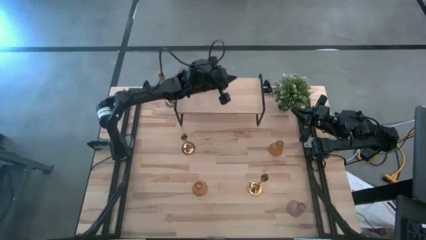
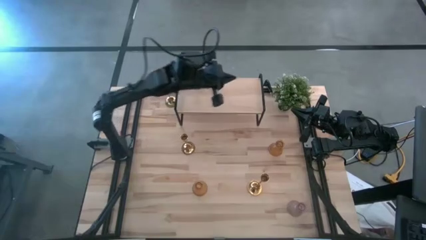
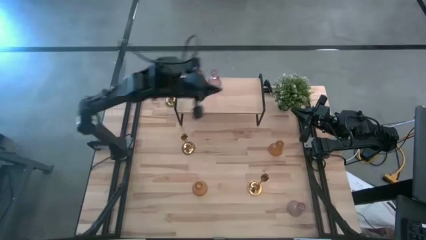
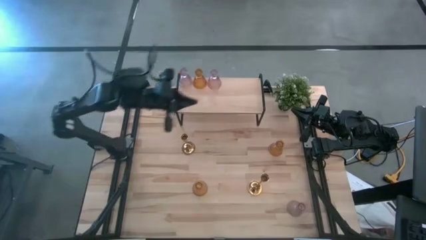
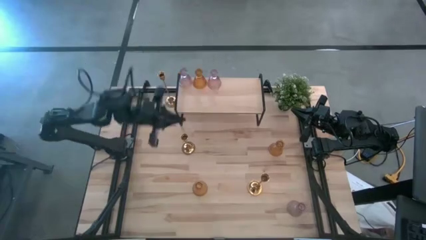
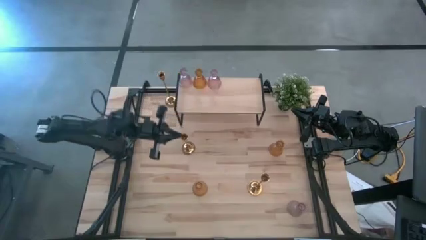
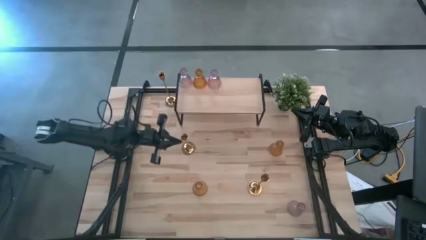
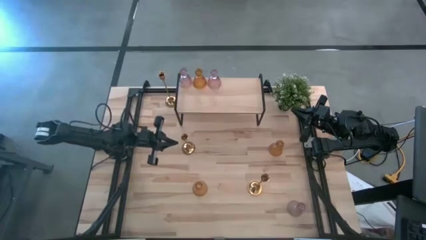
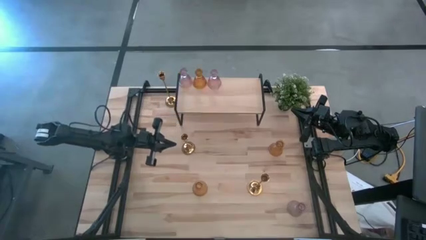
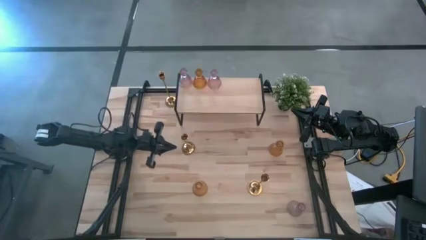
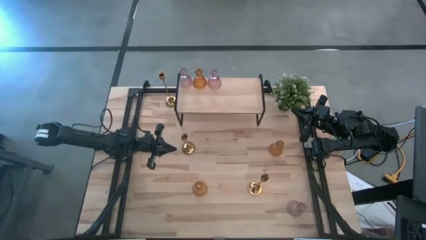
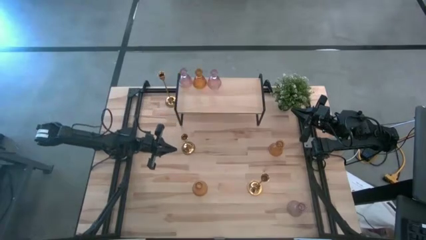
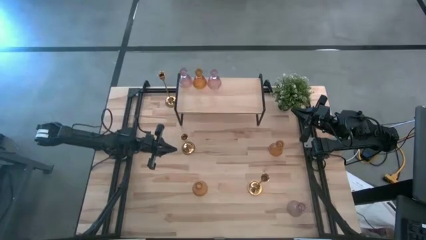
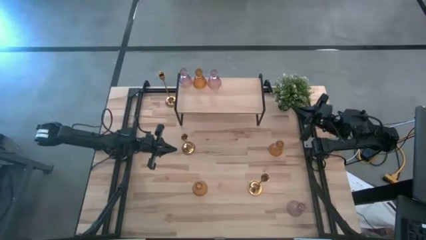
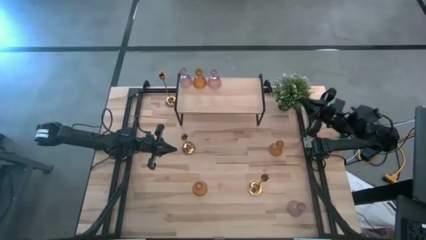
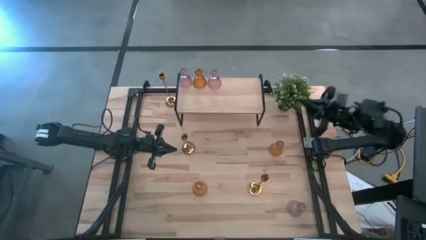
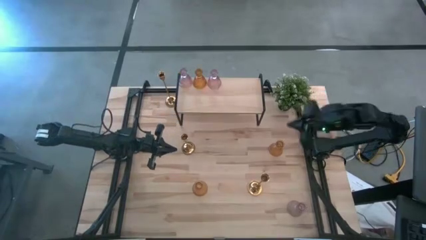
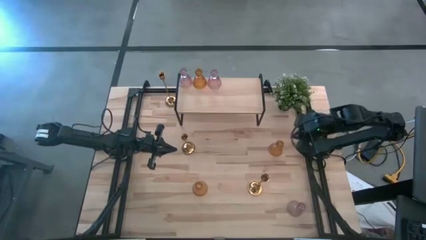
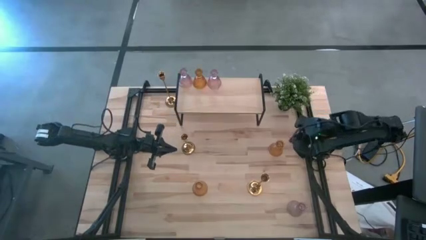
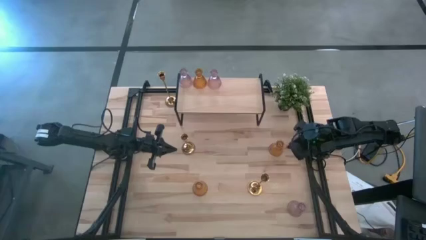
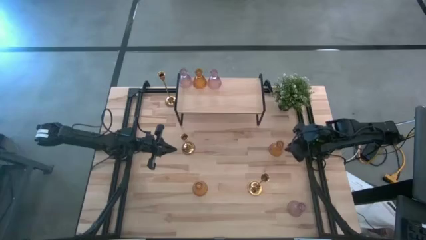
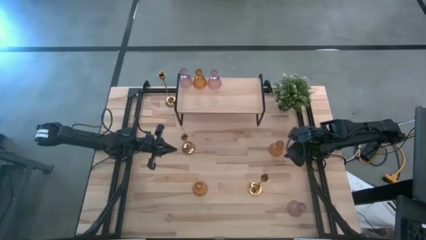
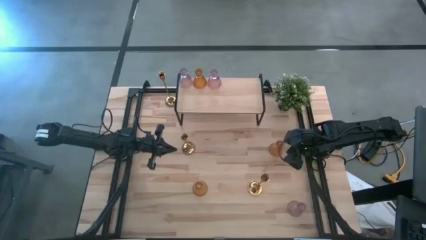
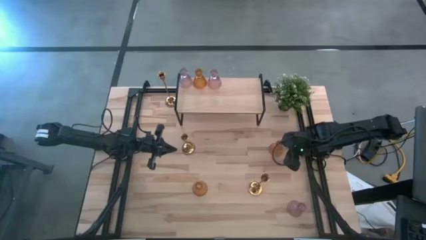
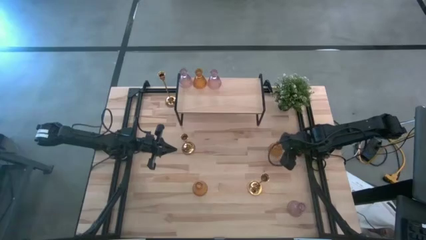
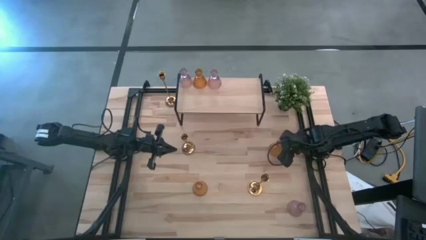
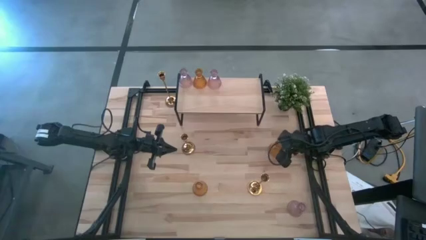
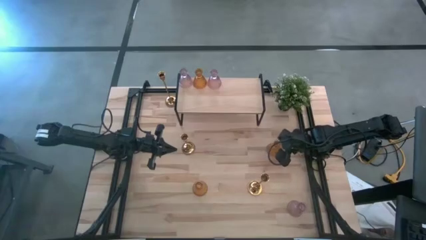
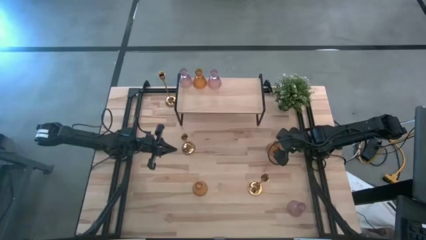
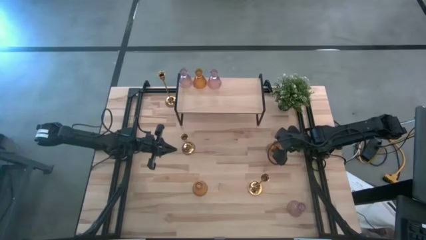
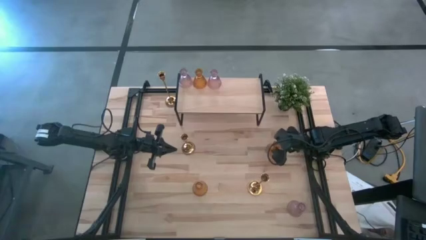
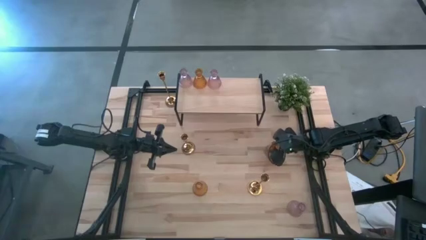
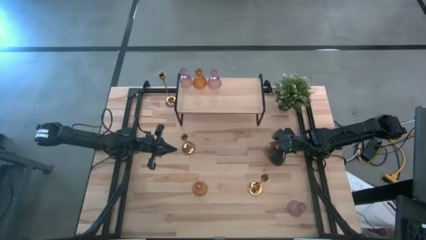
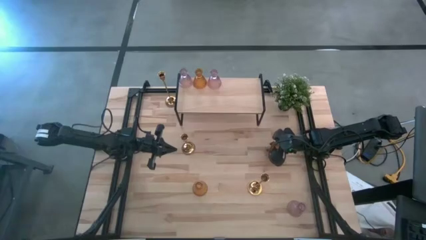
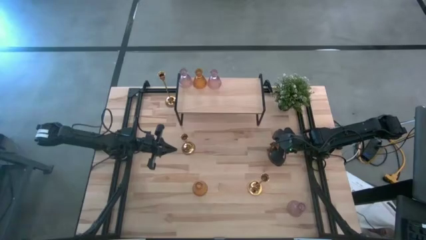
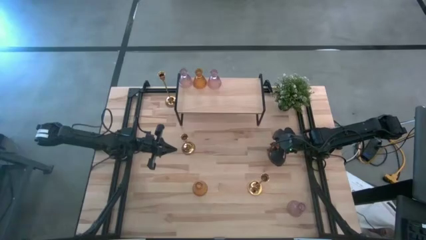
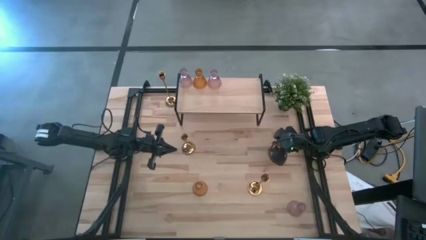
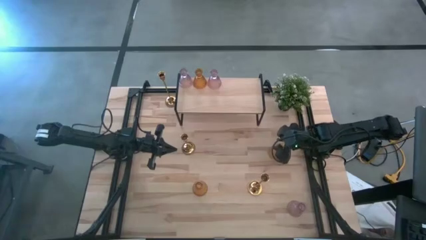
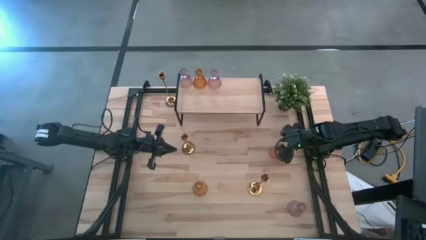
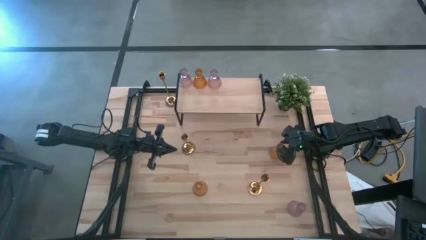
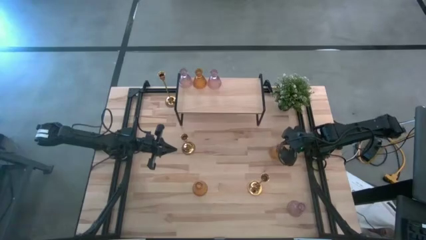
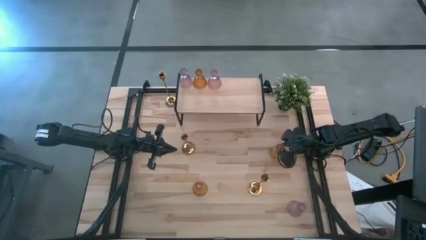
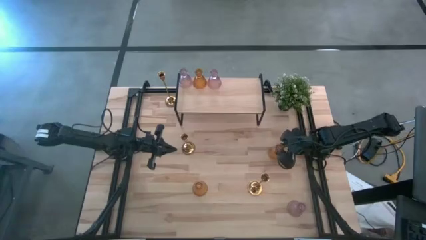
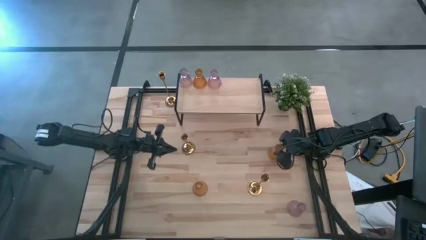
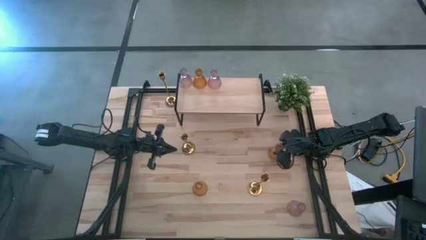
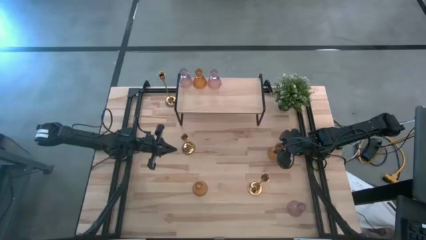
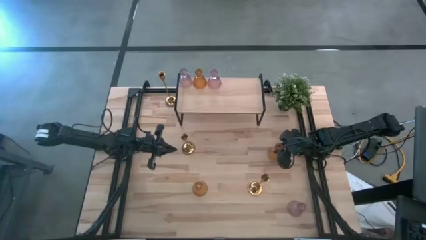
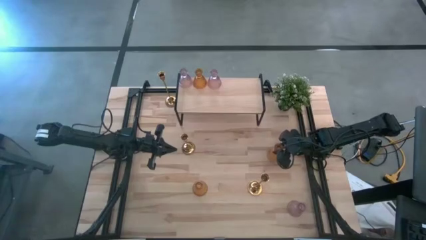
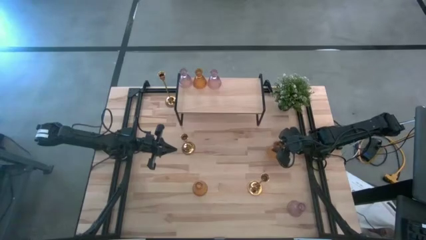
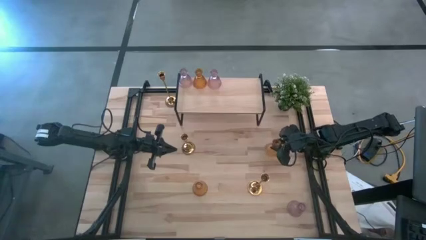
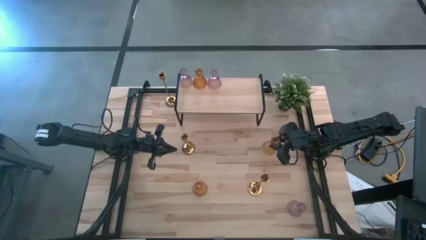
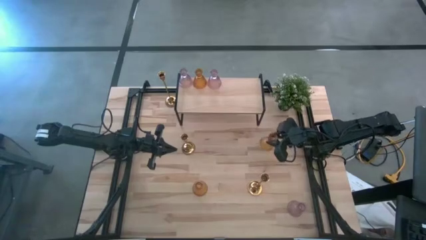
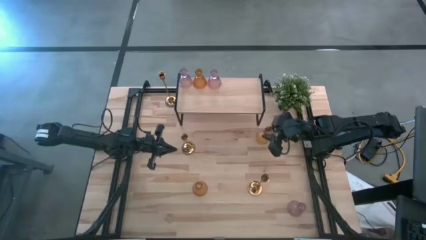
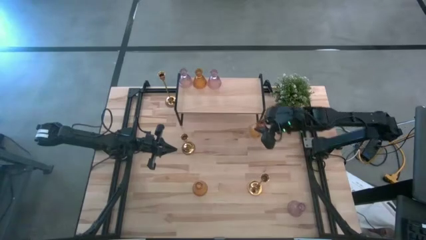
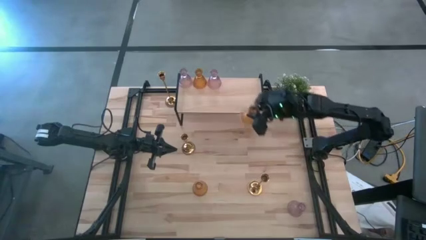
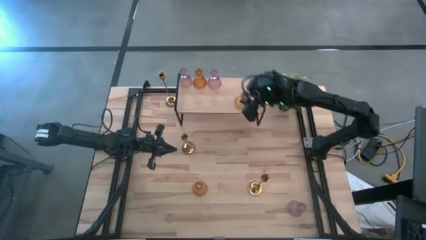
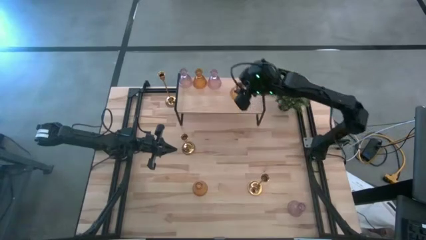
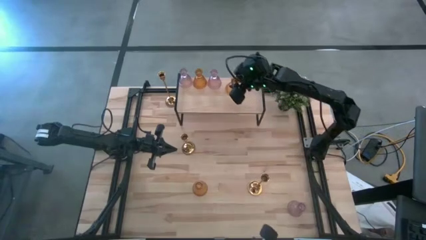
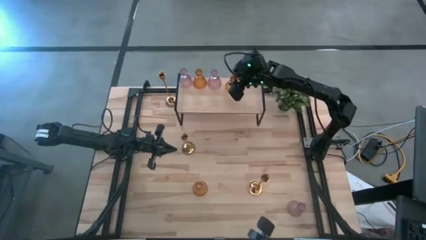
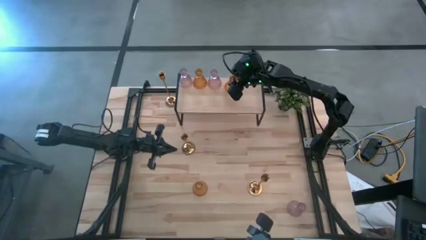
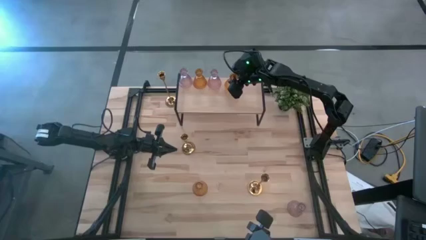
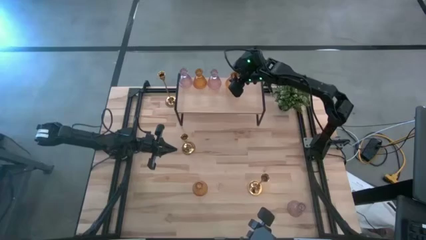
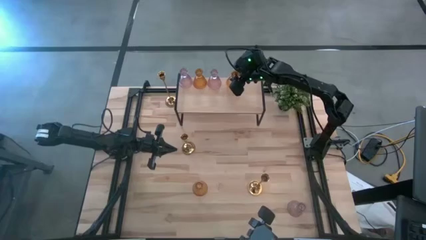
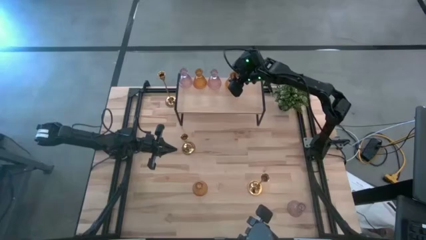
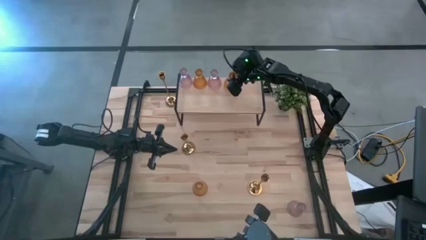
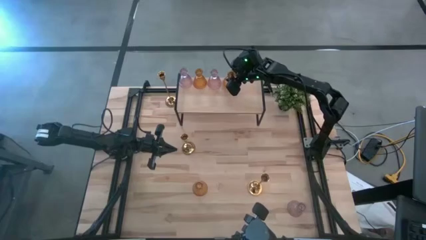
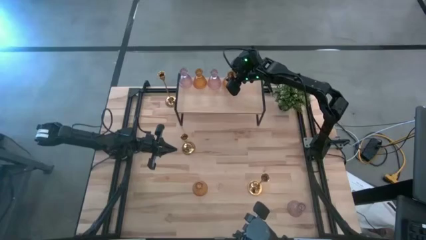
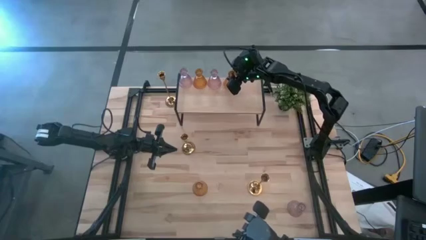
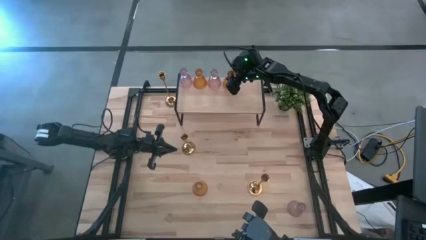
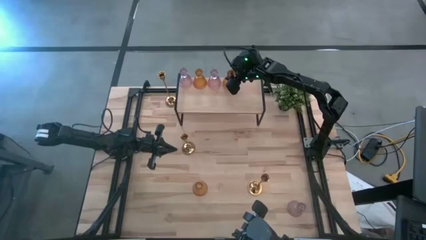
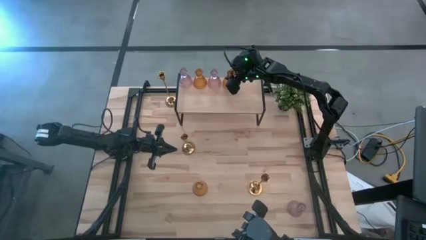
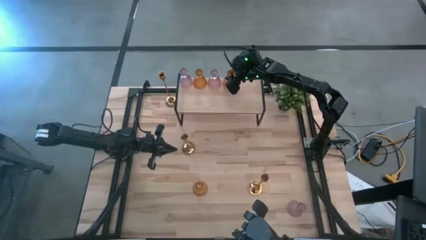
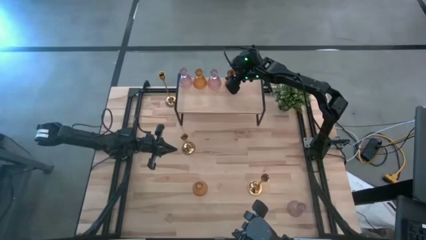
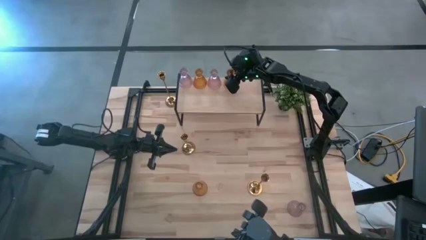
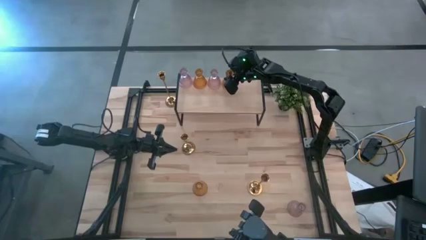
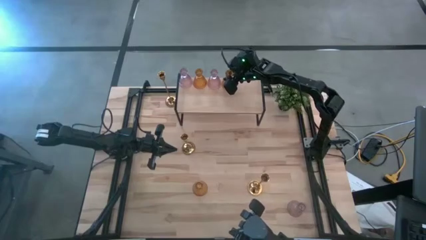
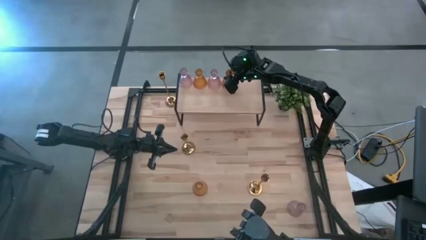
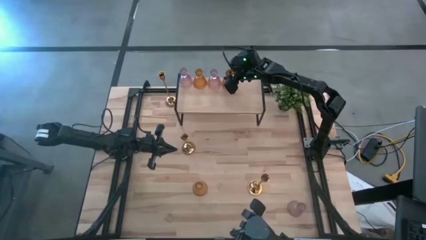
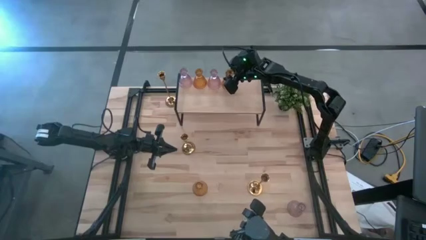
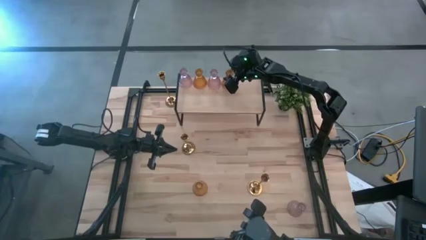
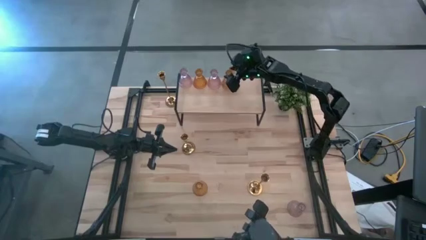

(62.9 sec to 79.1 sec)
Task: Pick & Place candle stick holders
Put the top yellow glass candle holder on the shelf aligned with the other glass candle holders
